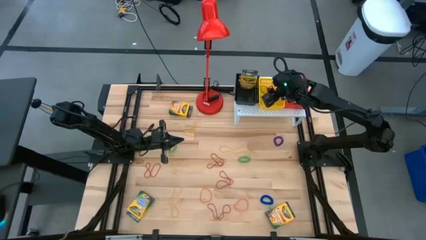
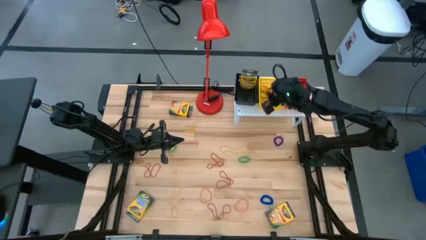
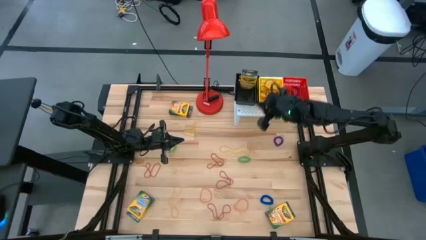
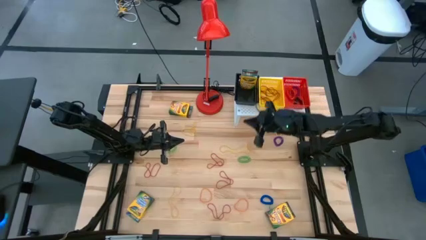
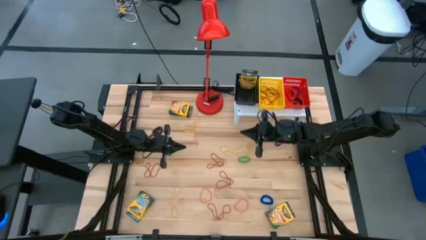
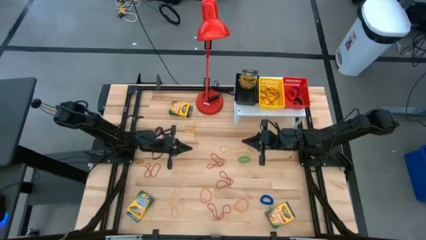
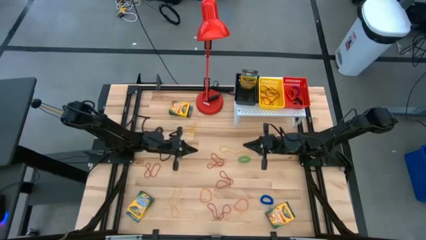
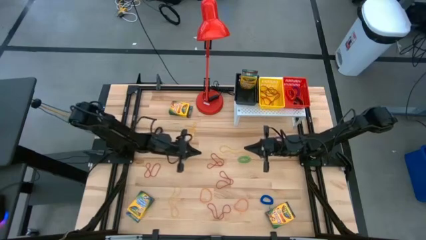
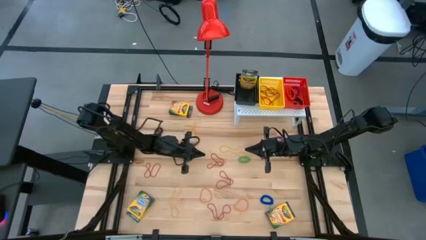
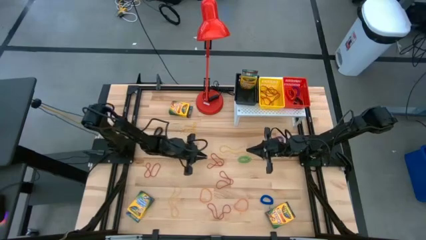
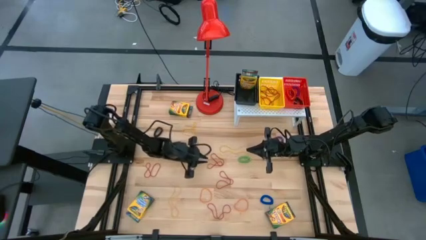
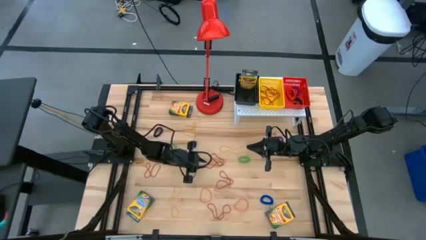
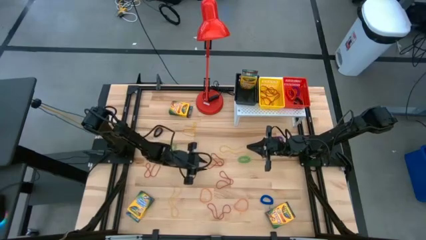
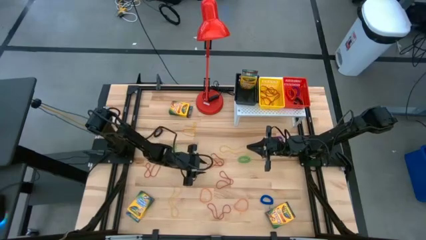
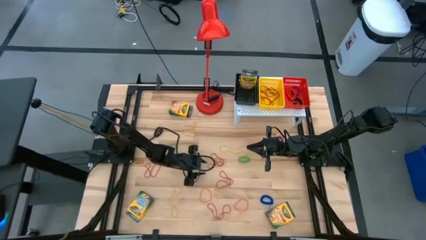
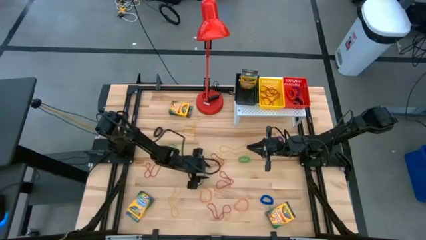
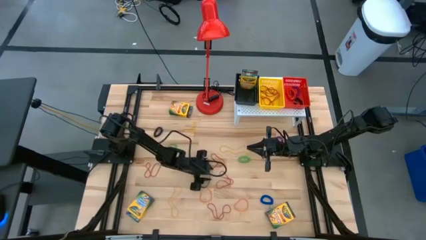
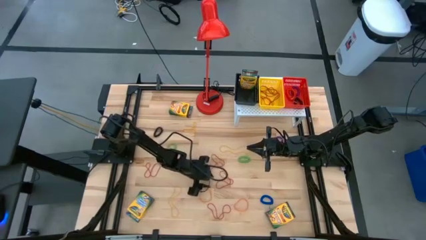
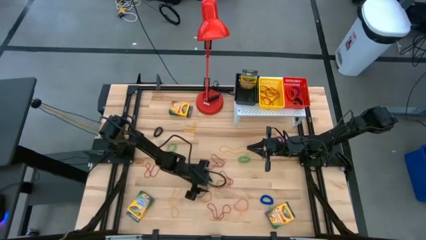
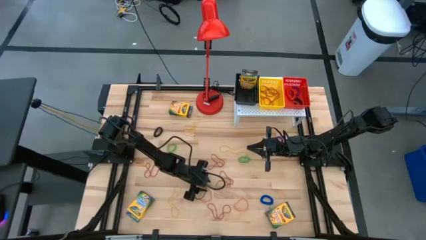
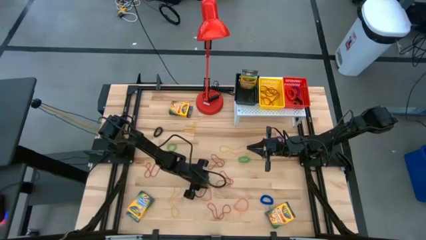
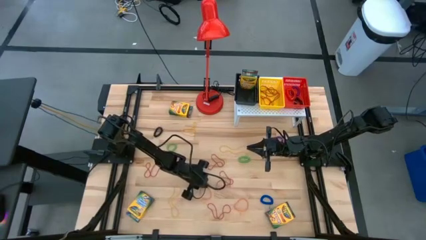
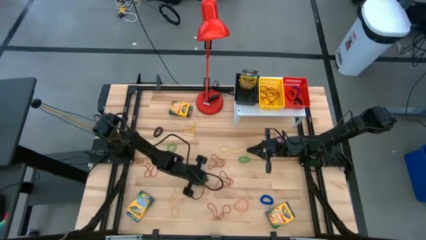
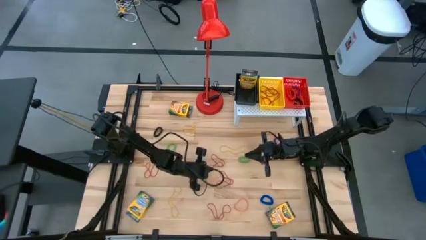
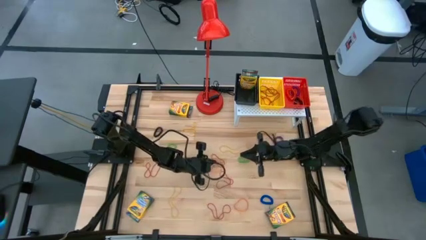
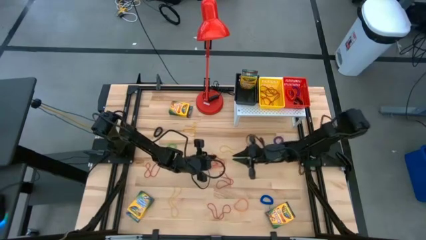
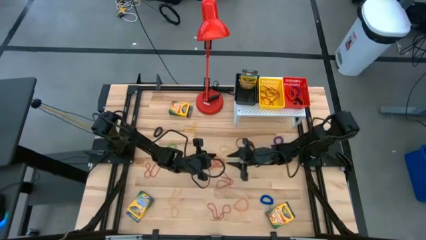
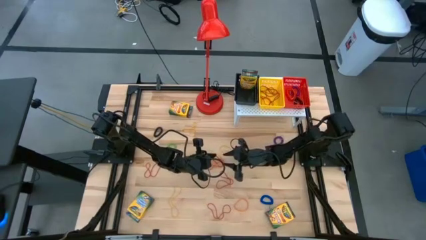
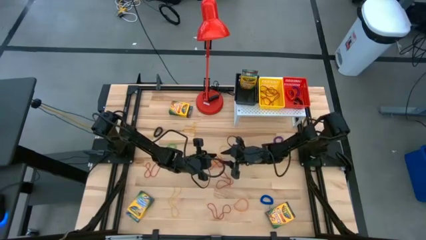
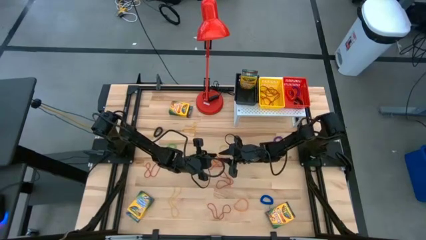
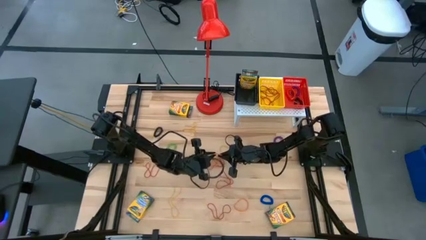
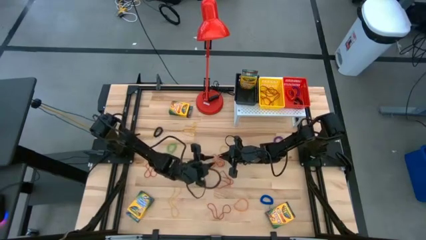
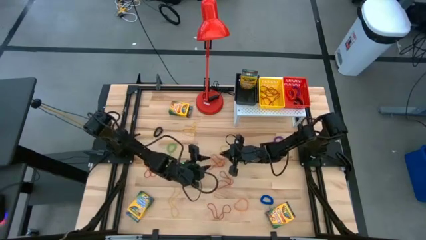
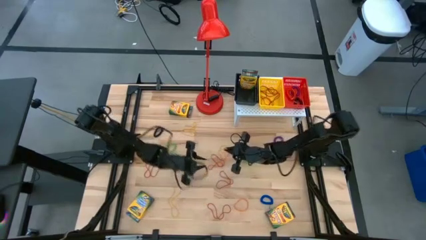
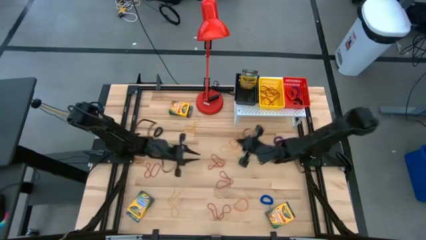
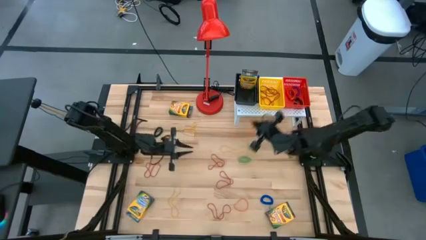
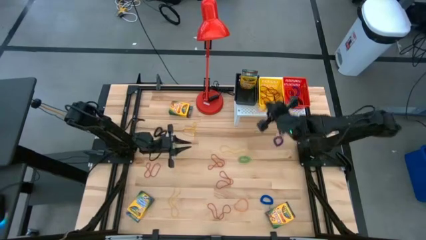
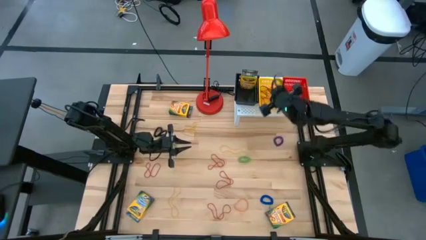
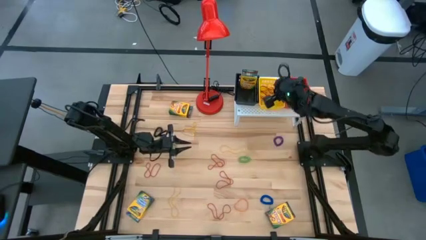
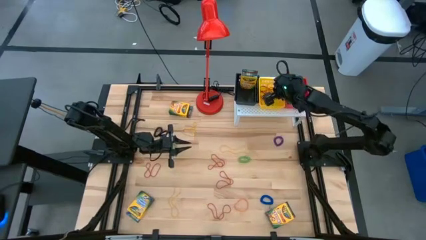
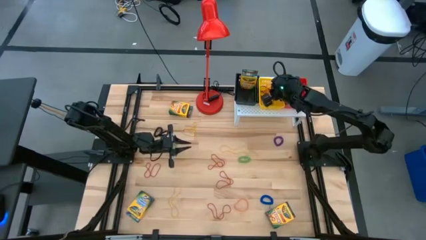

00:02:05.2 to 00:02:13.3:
Task: Pick & Place Office Desk Supplies
Put the left orange rubber band into the yellow bin

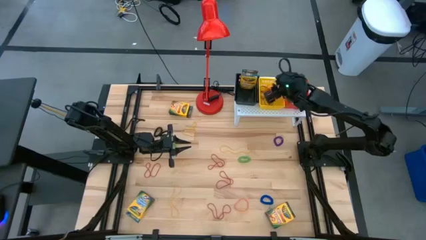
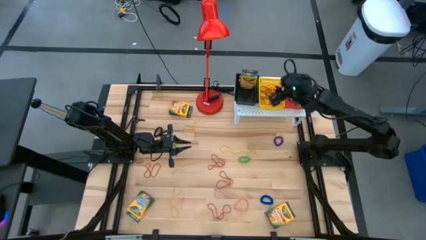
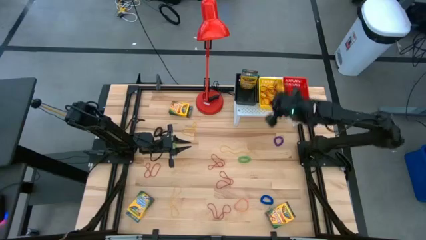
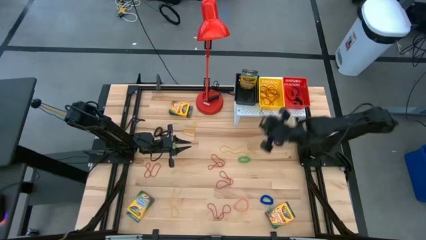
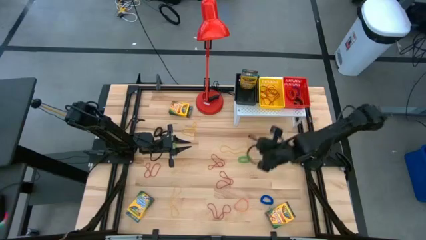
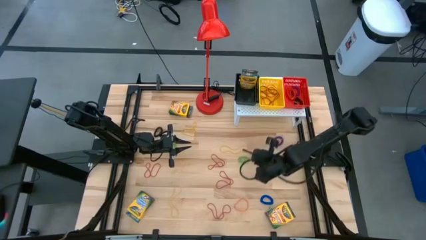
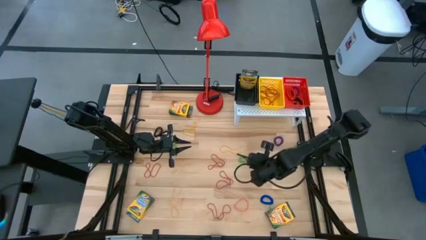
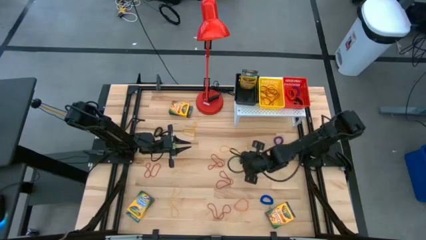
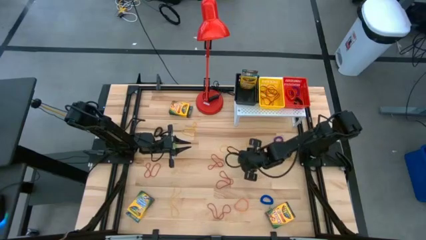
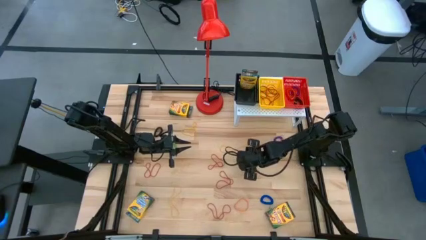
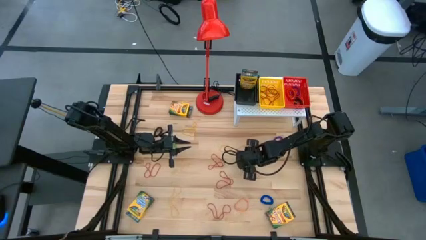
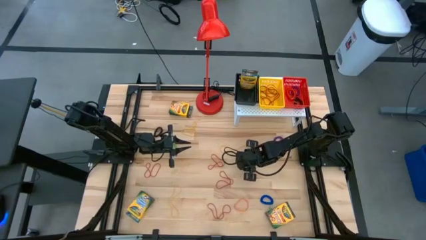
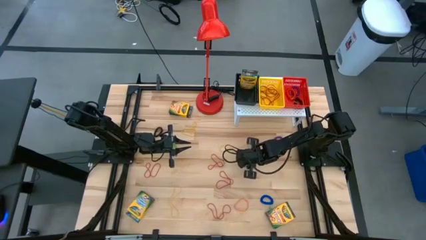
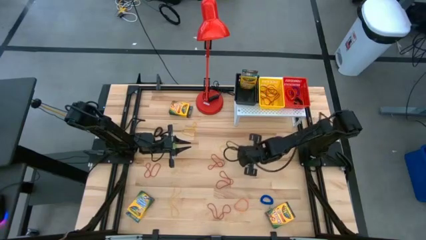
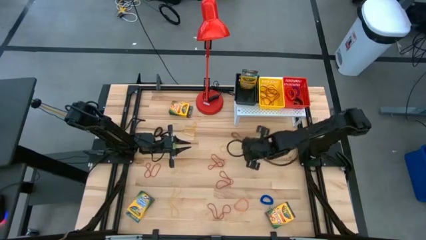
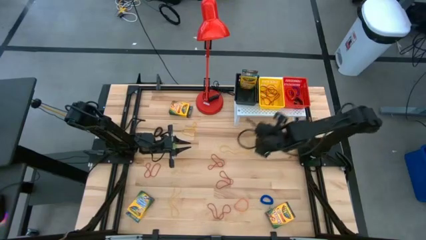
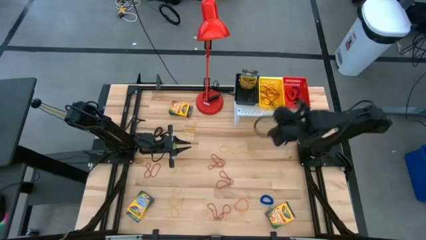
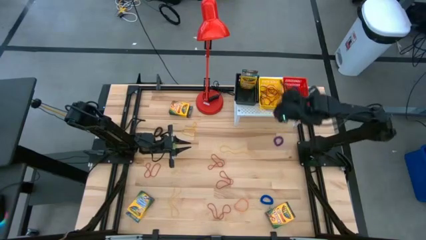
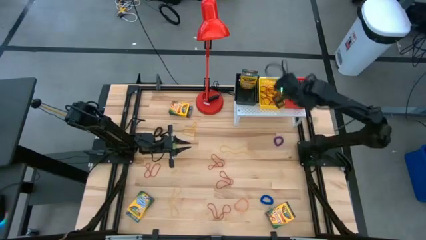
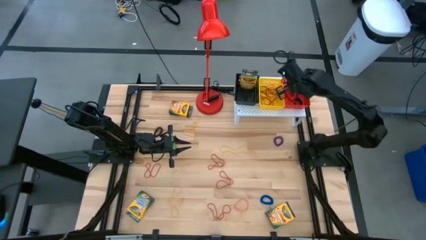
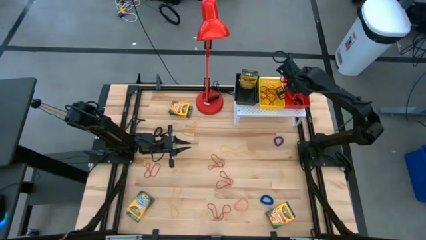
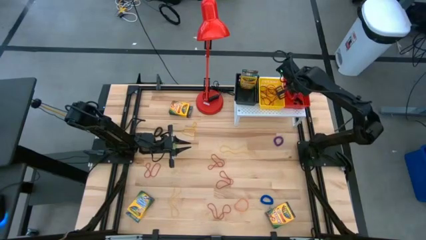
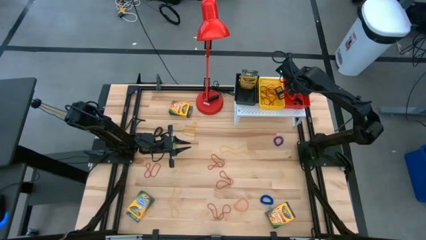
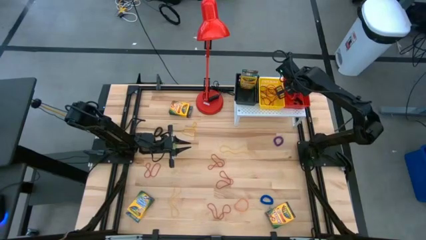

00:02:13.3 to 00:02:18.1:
Put the right green spring keychain into the red bin
